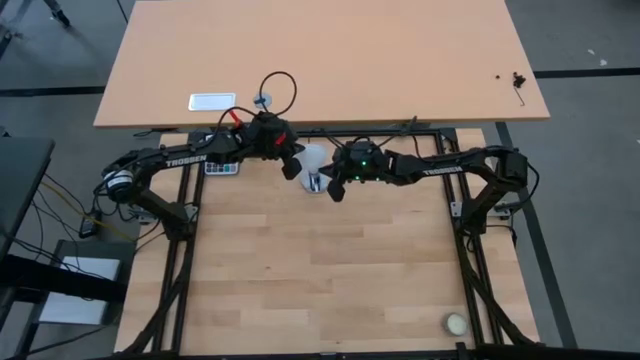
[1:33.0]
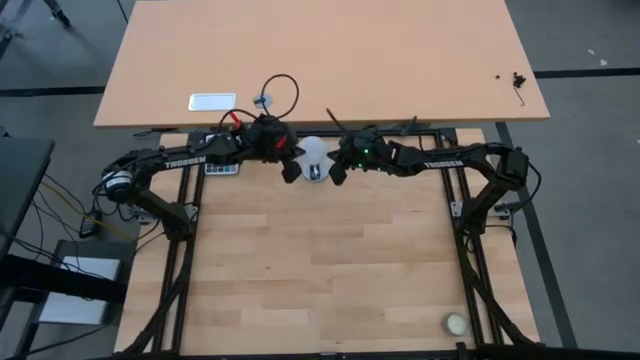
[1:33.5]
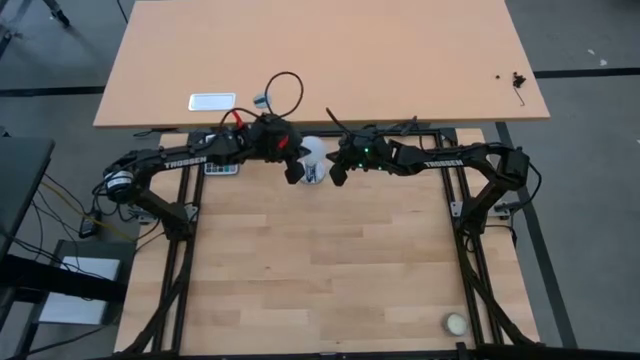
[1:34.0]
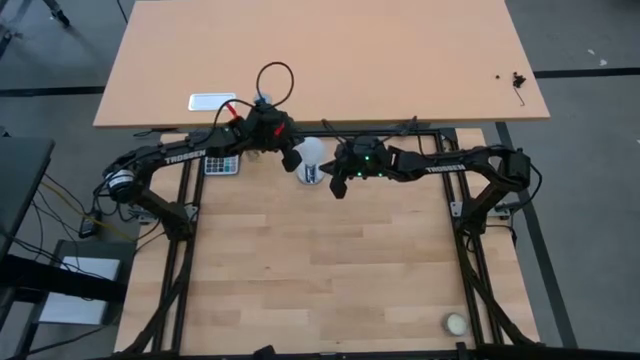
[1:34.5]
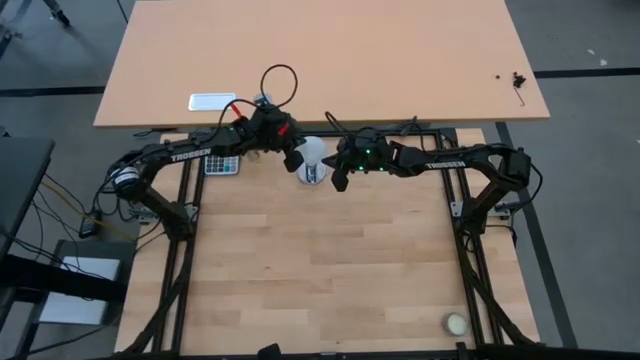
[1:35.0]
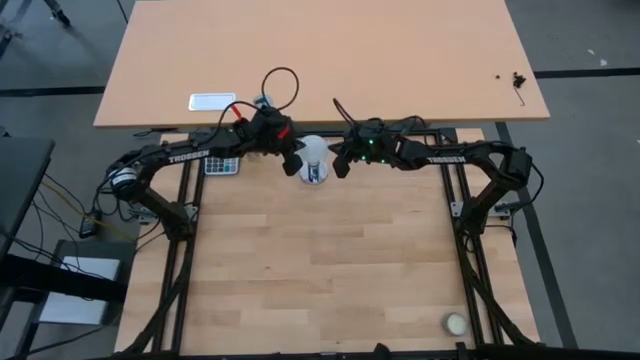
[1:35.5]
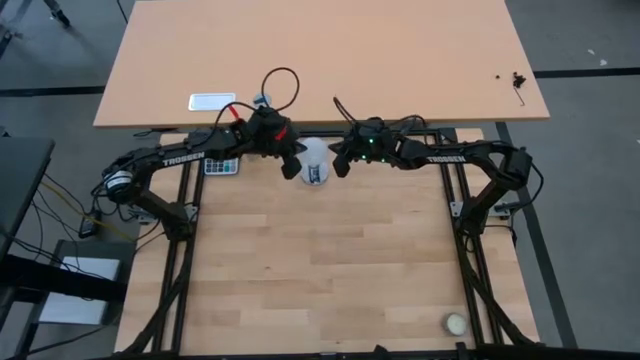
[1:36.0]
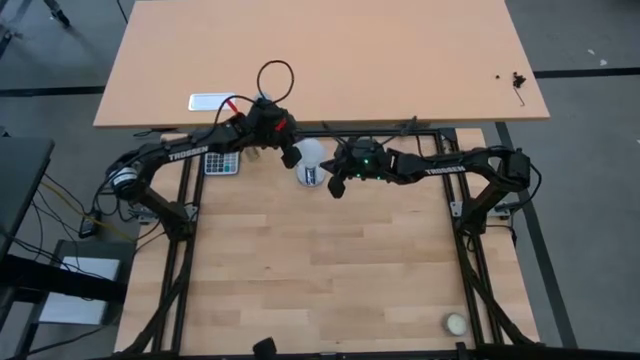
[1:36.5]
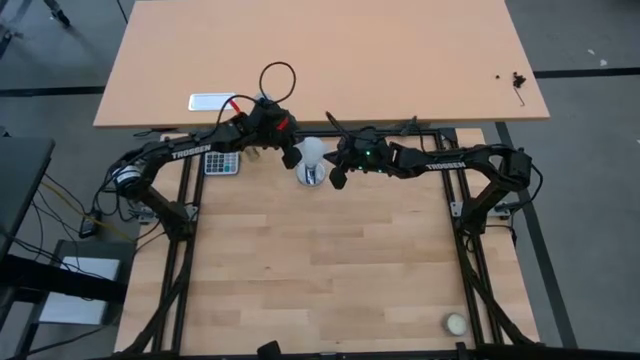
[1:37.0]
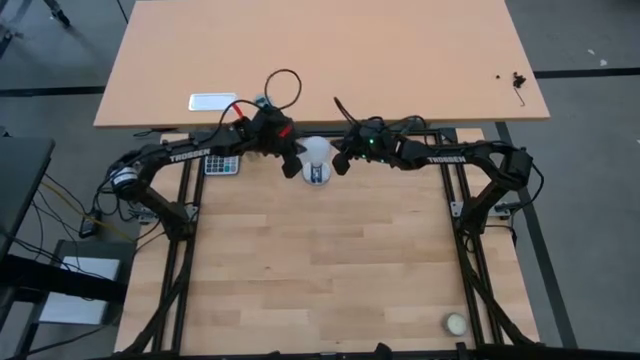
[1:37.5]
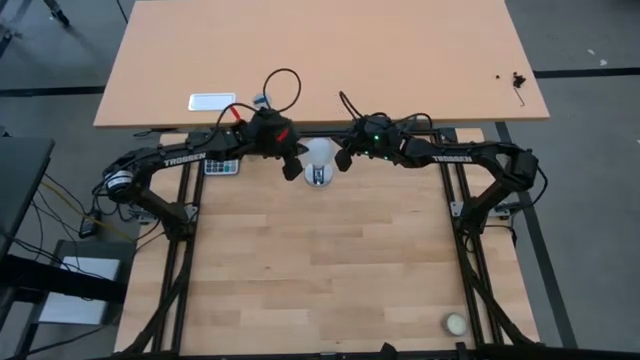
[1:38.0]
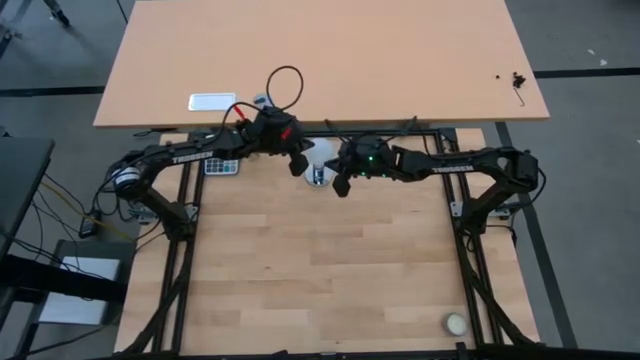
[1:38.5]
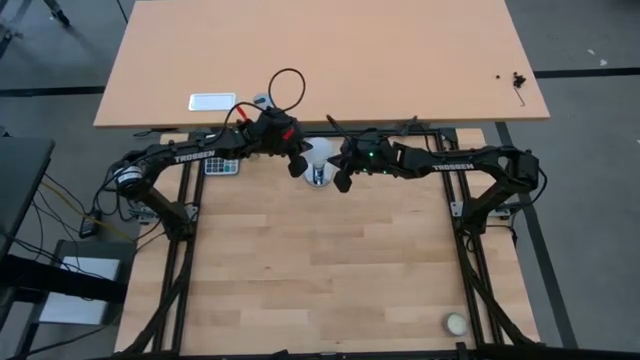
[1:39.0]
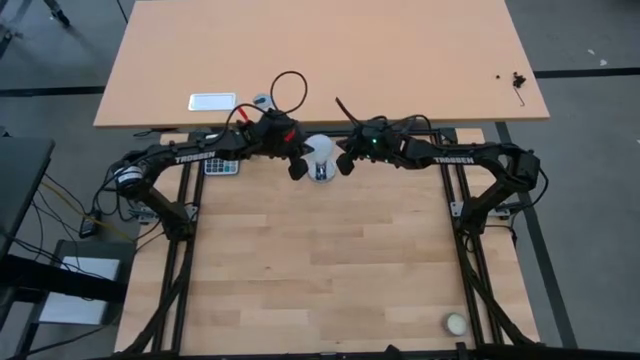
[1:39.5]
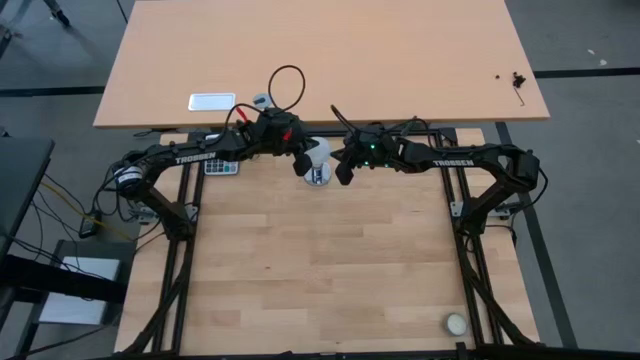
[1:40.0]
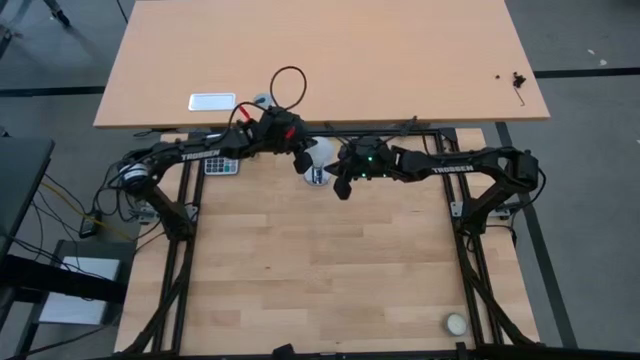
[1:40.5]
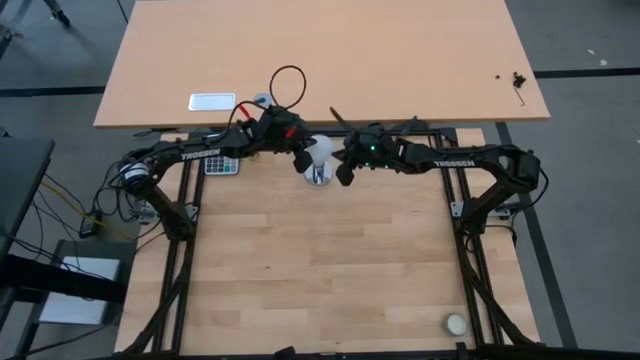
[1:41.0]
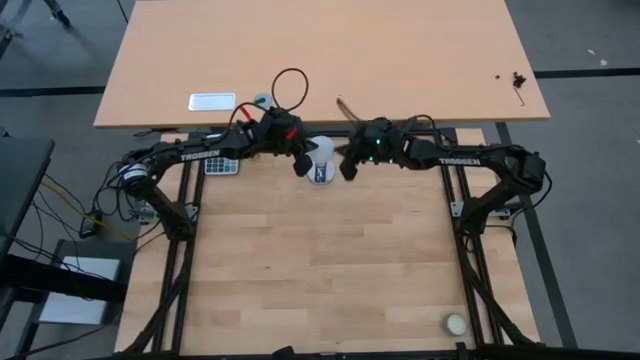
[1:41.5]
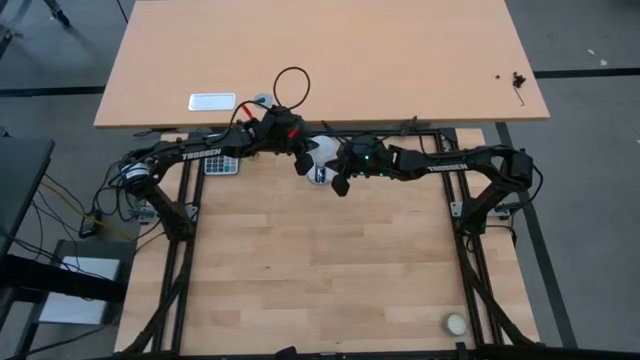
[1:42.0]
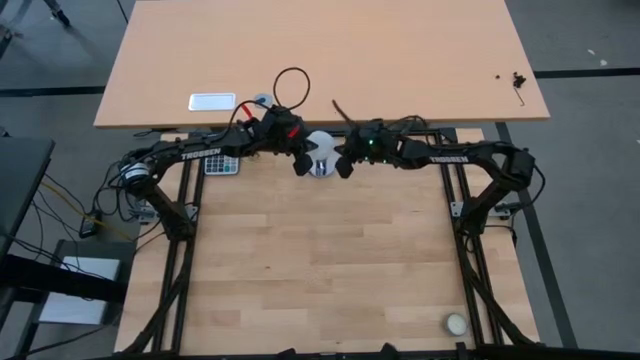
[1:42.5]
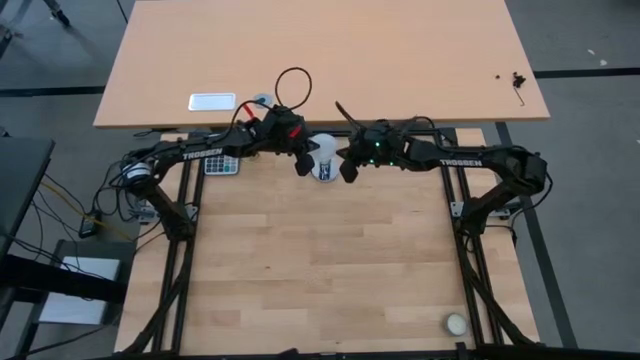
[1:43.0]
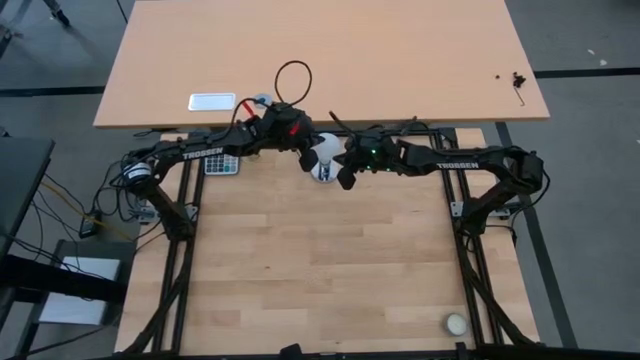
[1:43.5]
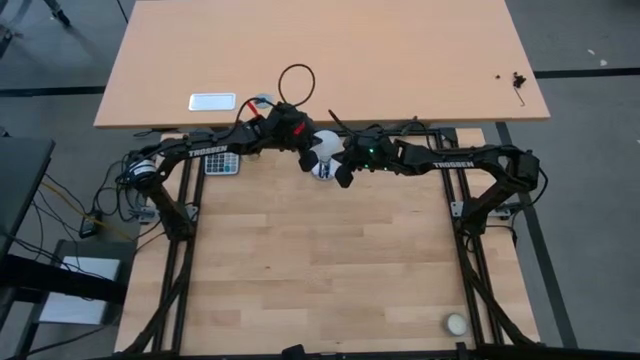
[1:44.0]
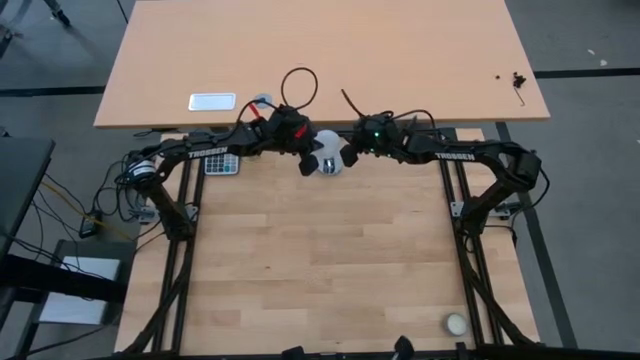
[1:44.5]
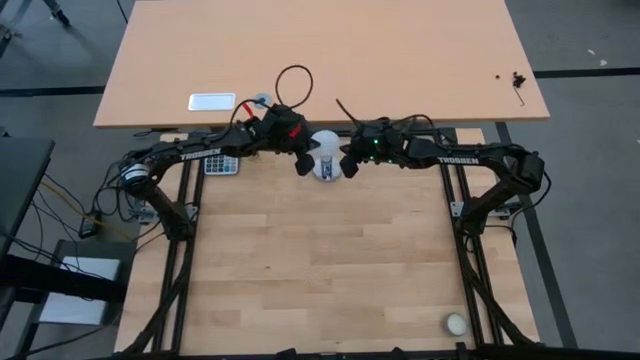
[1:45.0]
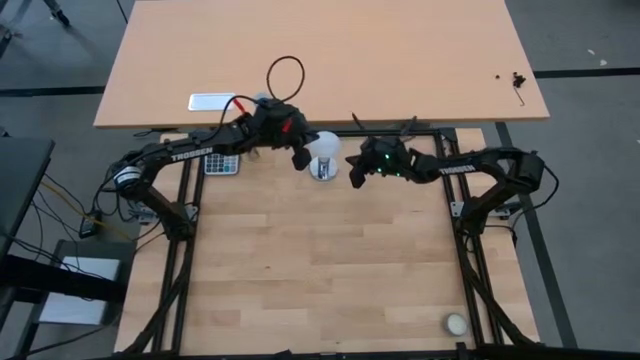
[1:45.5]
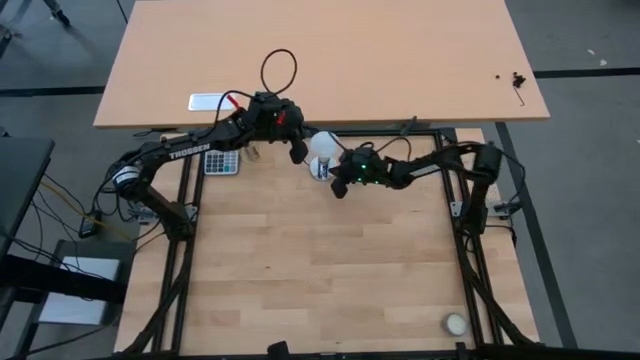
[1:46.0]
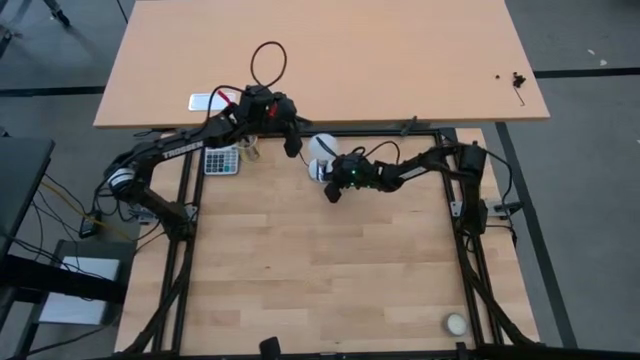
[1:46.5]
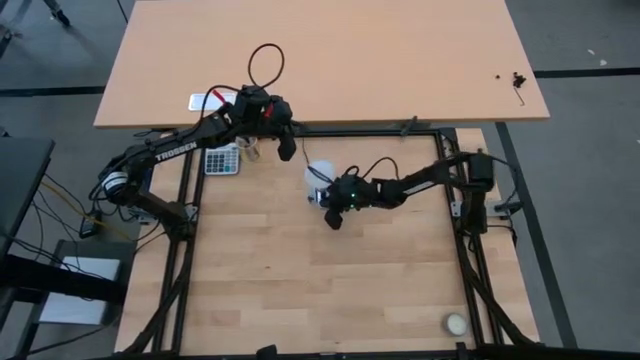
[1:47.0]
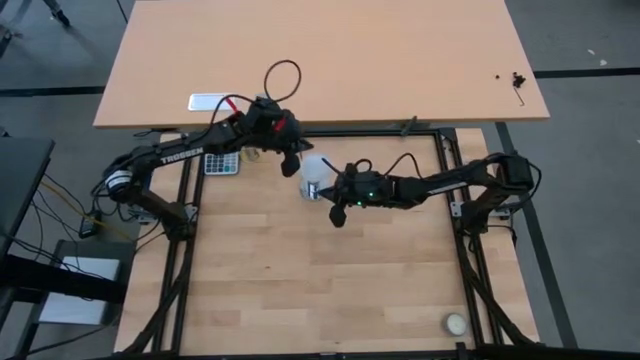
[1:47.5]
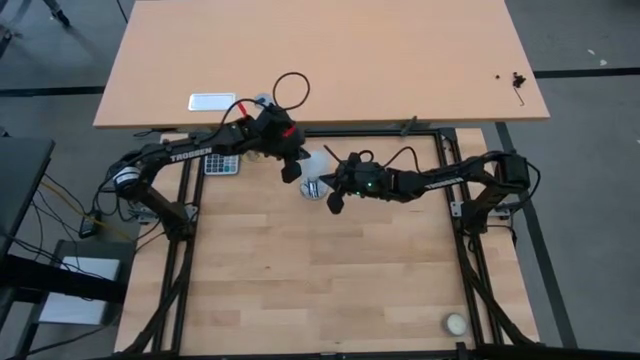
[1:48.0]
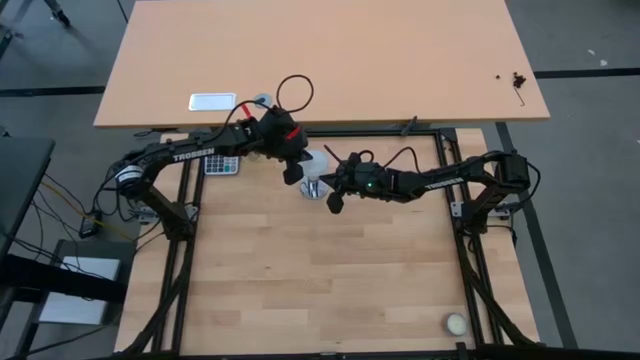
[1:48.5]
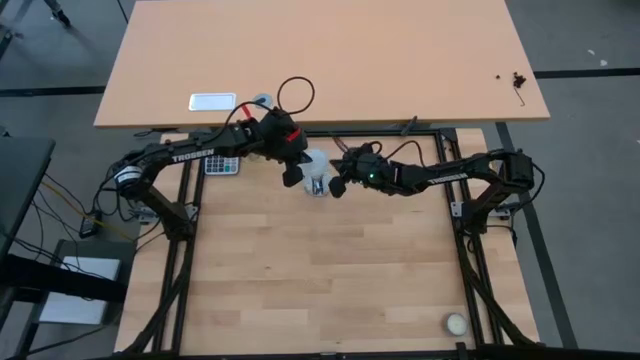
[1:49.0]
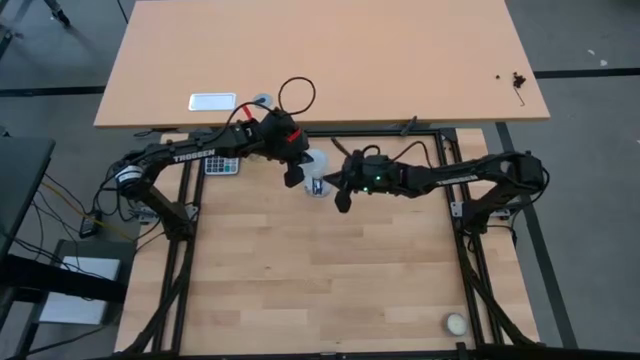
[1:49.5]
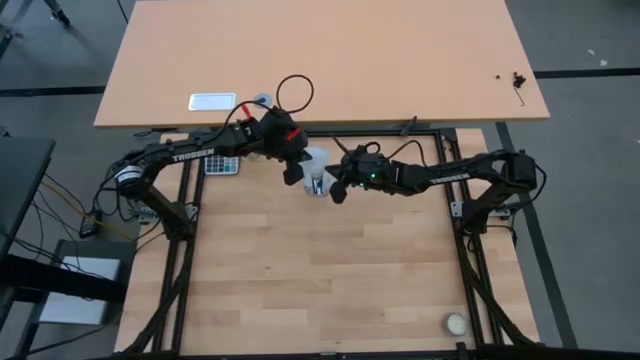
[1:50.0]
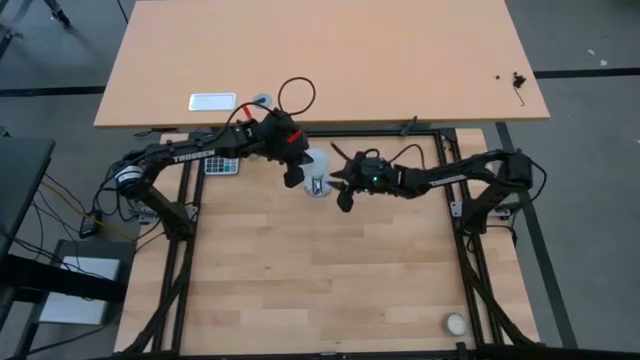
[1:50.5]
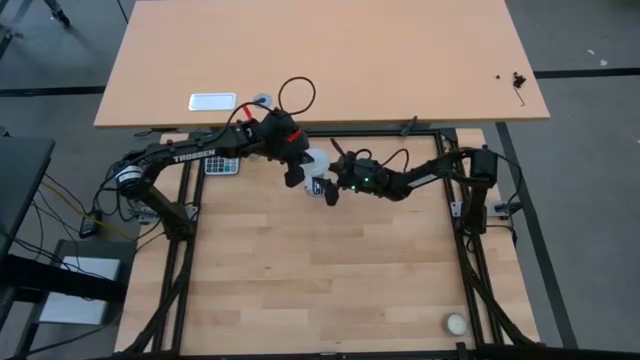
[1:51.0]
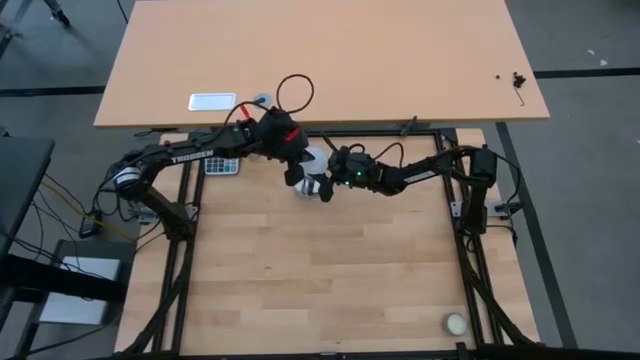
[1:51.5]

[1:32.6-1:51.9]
Task: Screw lightbulb
Remove the white lightbulb from the silver lamp

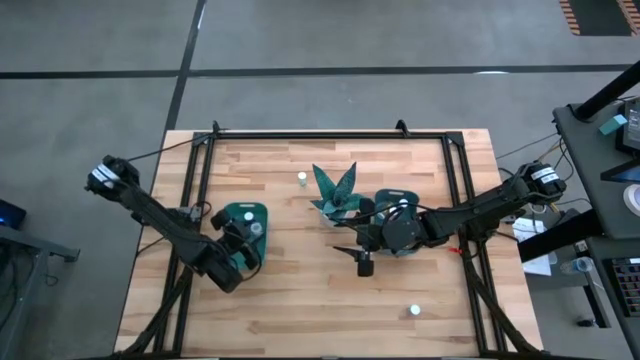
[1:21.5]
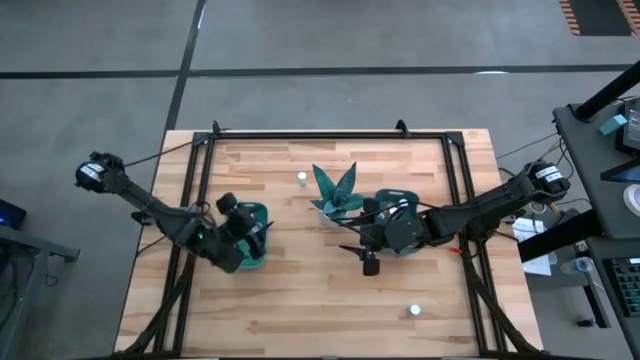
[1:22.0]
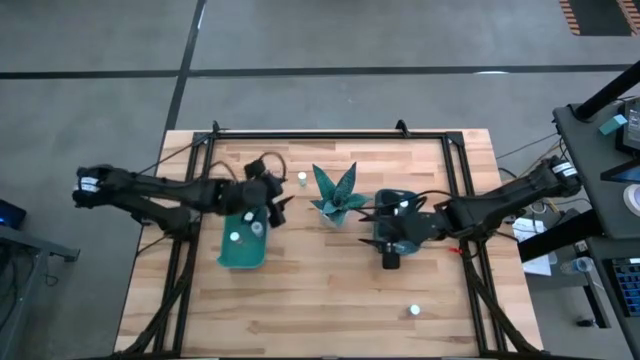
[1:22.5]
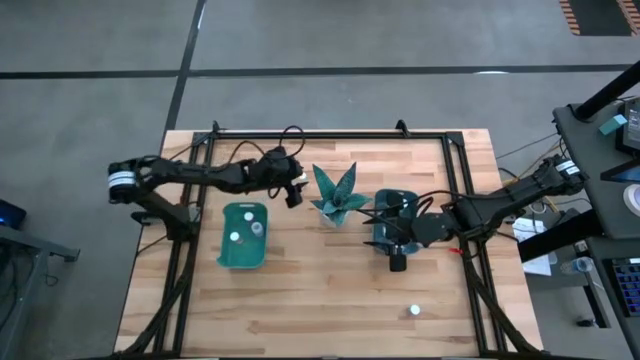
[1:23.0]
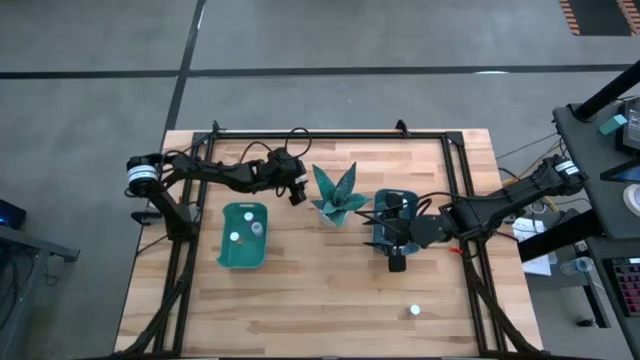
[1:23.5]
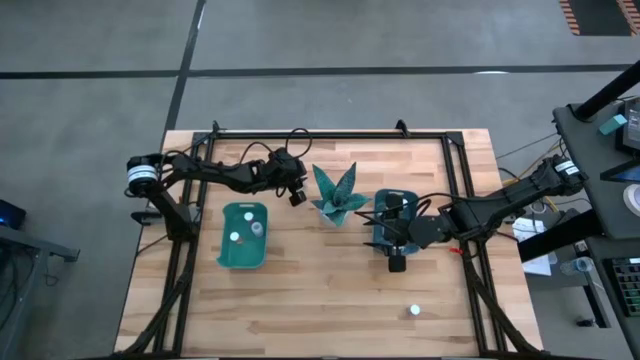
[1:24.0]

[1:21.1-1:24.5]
Task: Pick and place medicine bottles into bin by pill shape (circle, oval)
Put the blue tablet bottle into the blue bin
